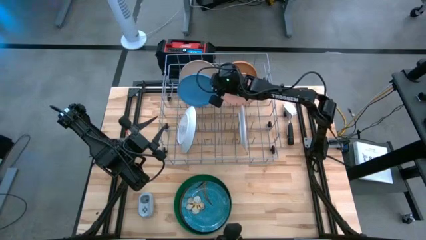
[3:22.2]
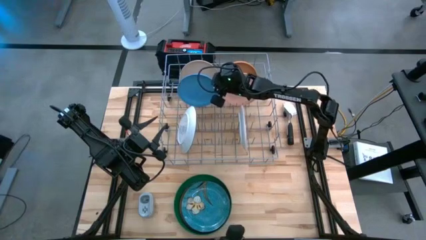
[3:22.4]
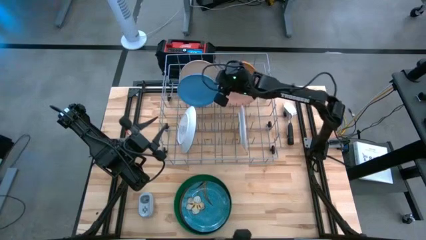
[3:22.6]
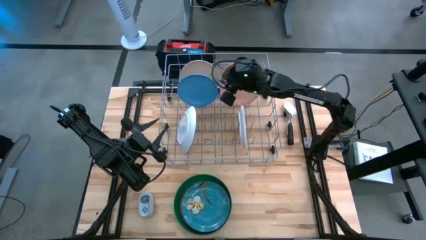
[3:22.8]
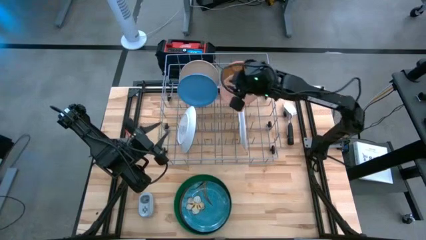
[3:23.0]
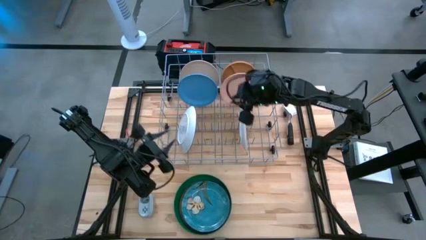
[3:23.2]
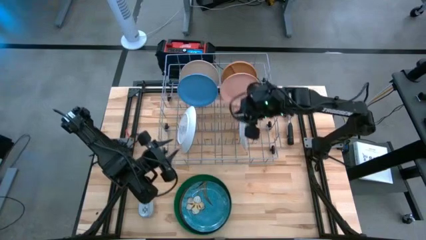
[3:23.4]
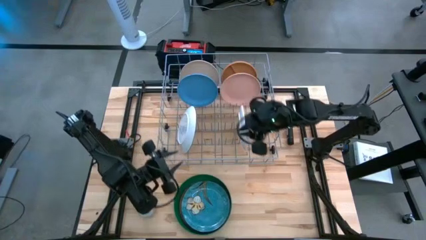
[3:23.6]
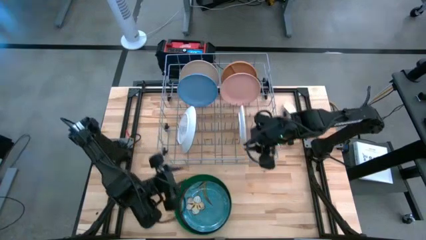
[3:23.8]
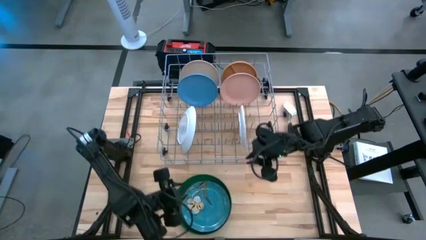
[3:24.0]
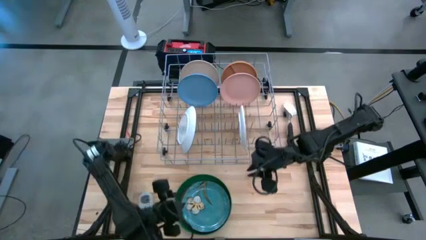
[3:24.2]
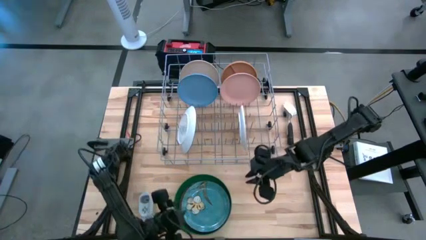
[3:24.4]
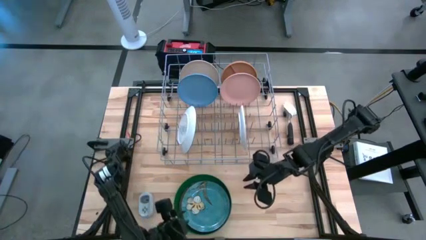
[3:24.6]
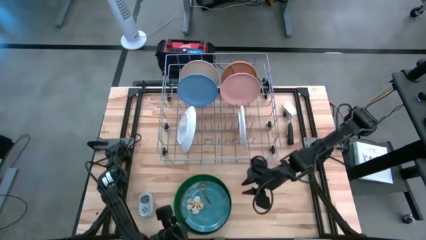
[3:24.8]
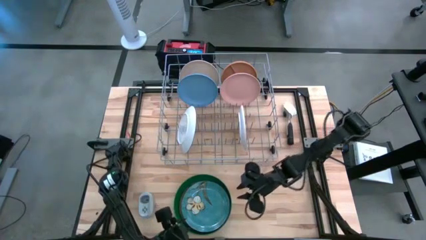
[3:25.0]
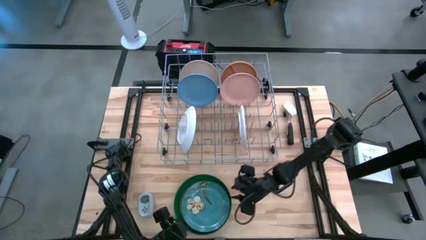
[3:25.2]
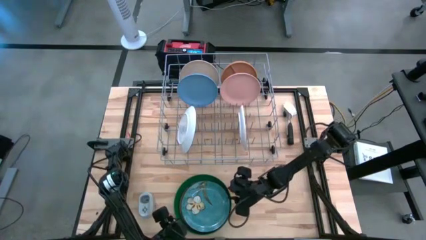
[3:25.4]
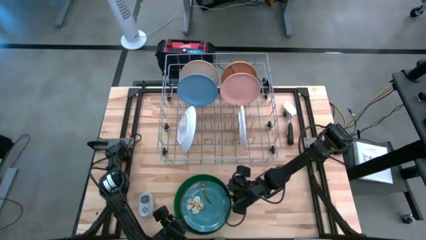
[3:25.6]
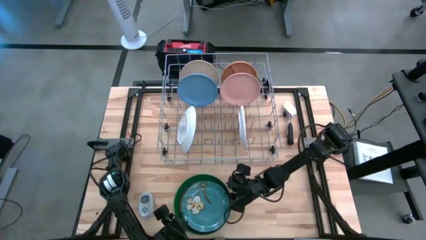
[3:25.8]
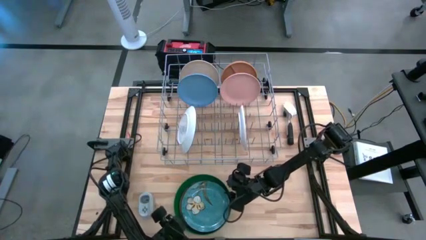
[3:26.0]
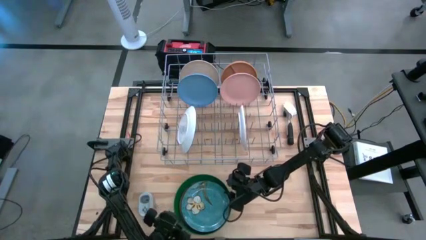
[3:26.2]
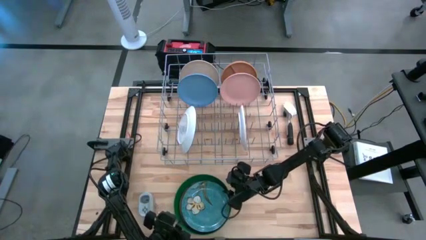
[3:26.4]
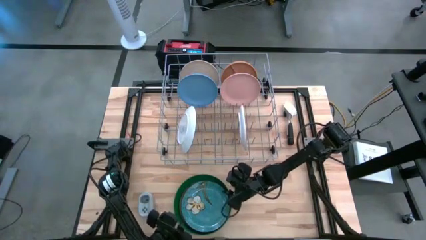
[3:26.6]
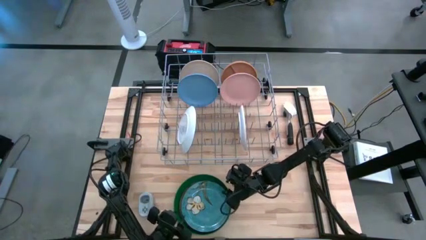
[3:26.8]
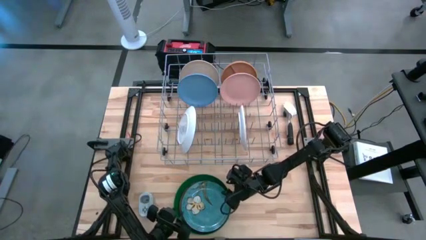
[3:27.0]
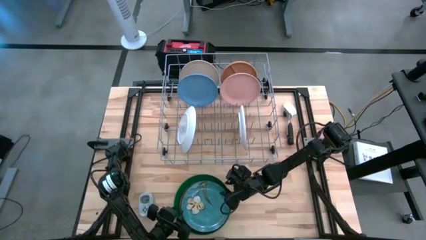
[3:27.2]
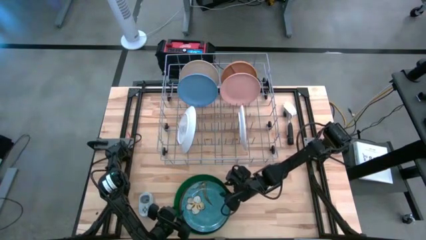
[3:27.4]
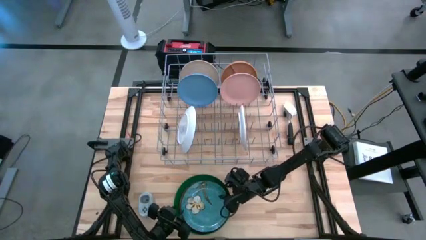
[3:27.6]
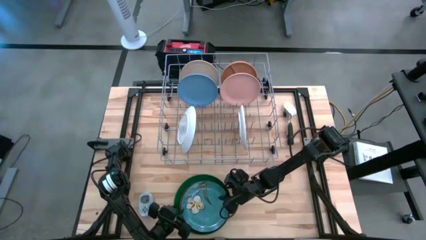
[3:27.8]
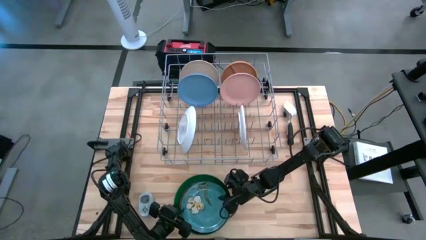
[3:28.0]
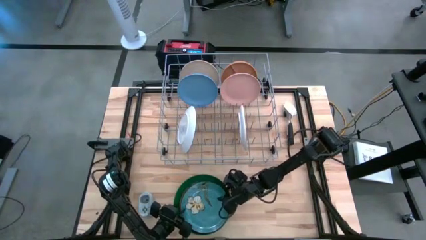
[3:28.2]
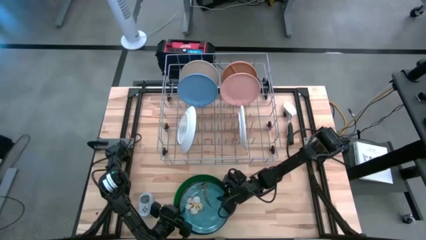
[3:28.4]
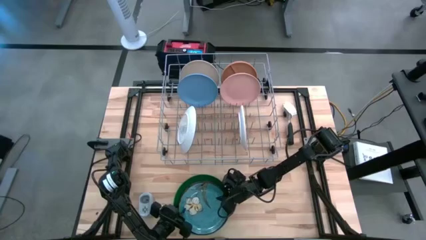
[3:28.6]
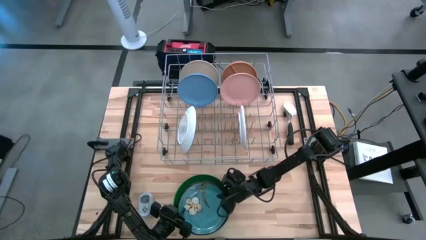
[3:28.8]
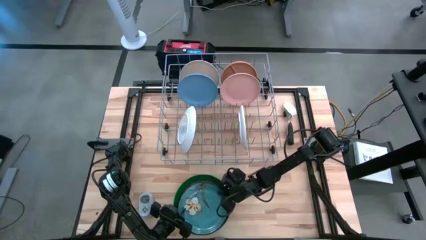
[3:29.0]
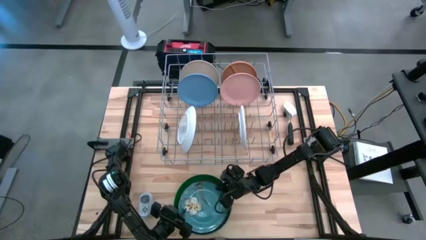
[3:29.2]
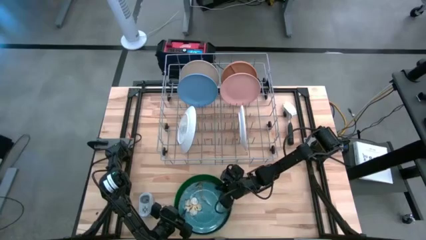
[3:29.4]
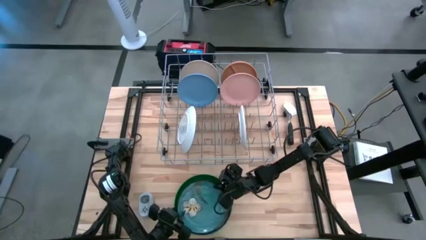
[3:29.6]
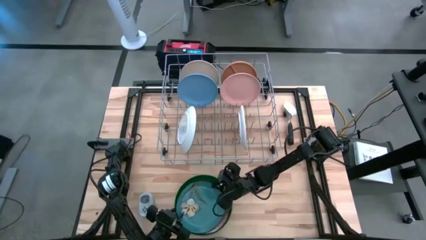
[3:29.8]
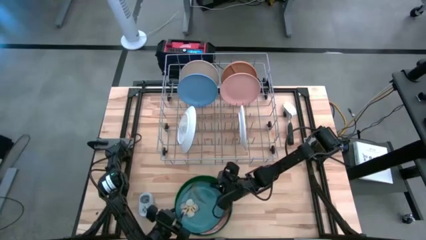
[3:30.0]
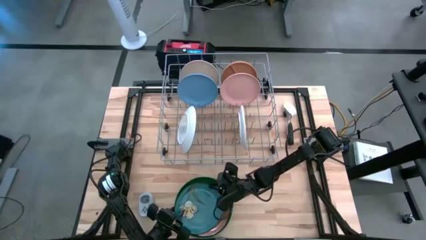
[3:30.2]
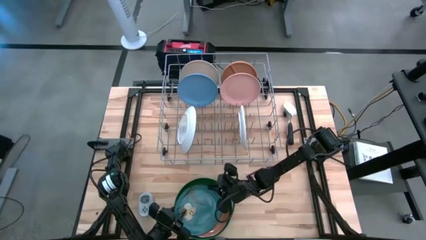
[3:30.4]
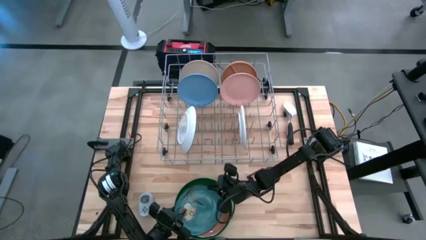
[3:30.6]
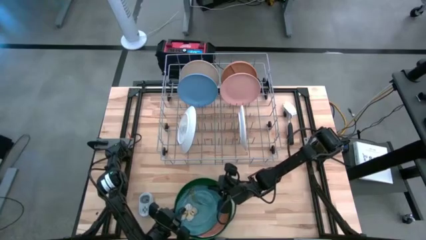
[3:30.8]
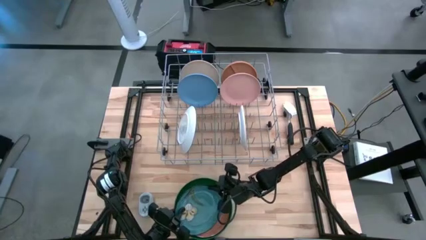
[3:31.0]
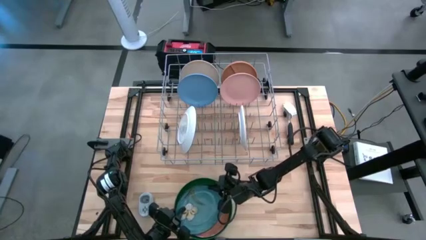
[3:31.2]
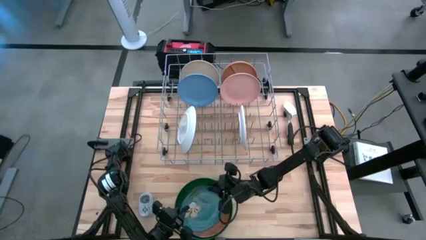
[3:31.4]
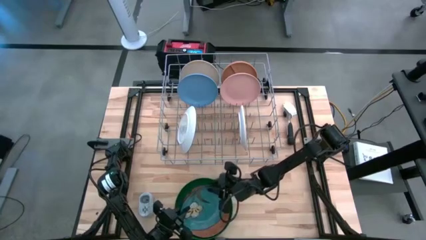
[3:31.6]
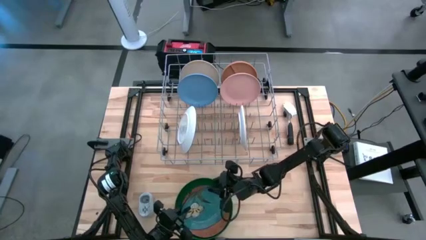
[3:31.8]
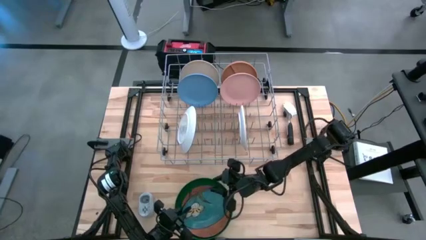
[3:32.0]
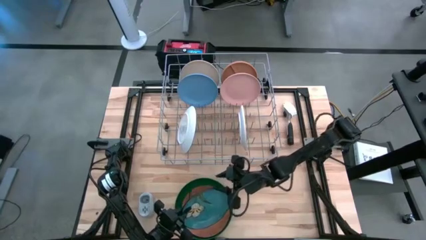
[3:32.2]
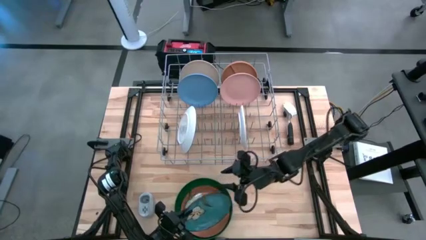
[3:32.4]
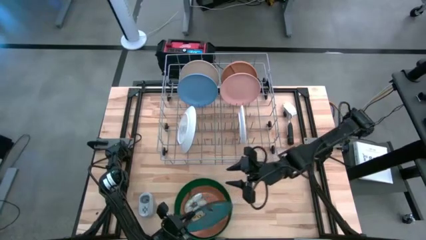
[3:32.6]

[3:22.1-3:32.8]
Task: Sort dishes
Put the blue flower patterned plate into the dish rack
